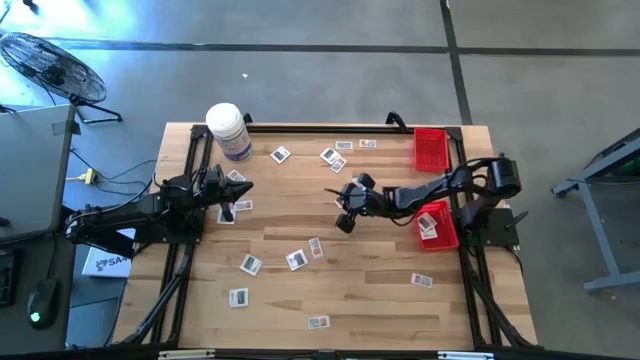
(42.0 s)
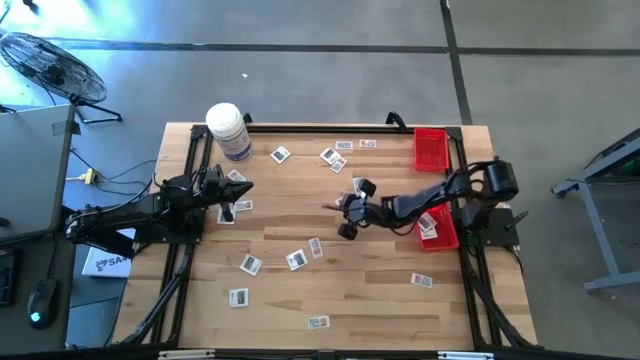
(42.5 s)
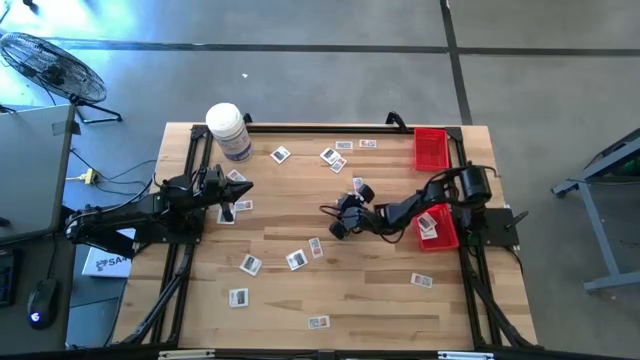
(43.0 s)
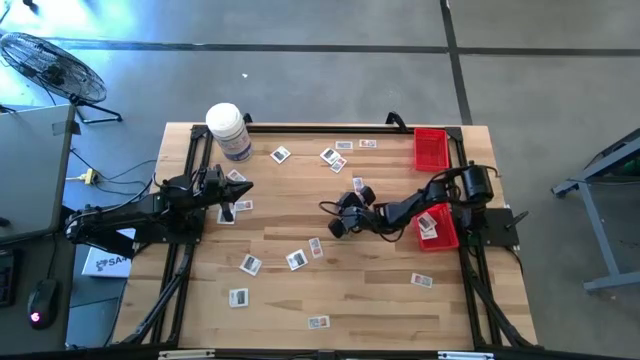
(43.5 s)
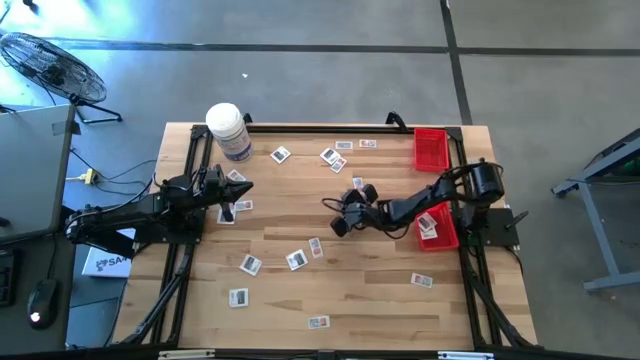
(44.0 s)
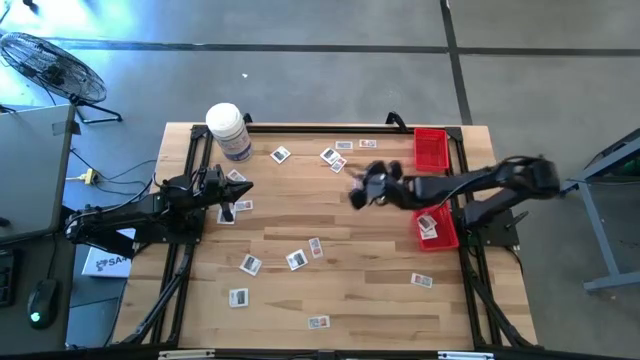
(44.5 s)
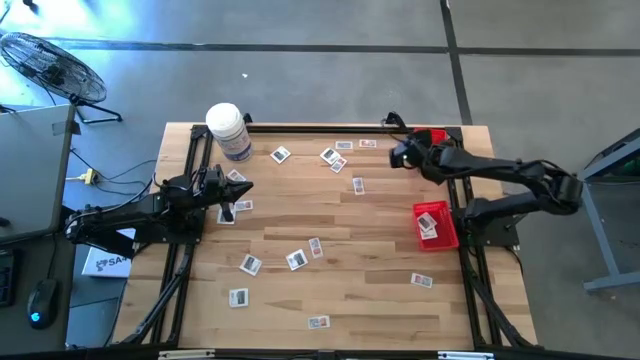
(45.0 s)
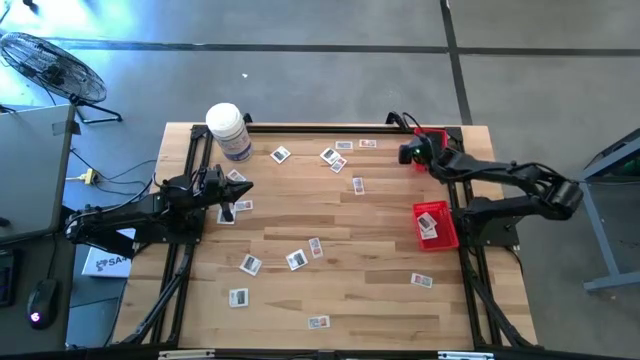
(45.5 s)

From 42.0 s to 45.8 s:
Task: Pick & Place First Aid Supplies
Put the ointment pack into the top basket

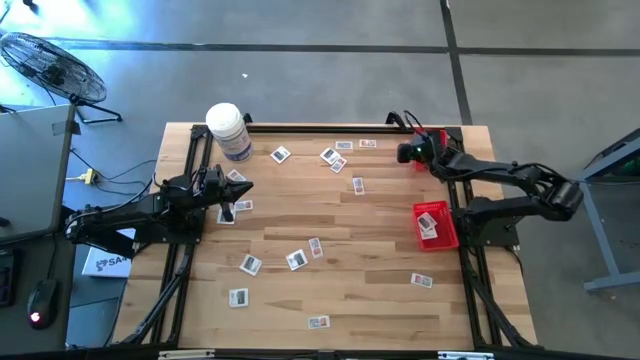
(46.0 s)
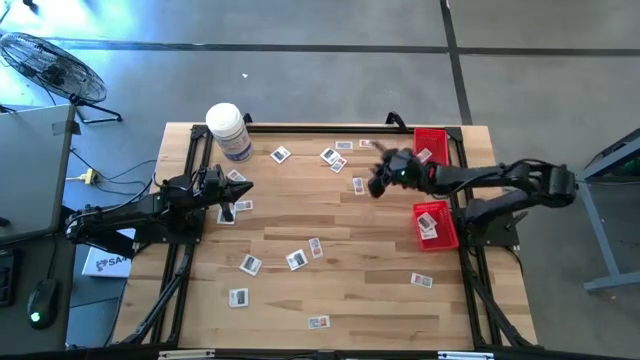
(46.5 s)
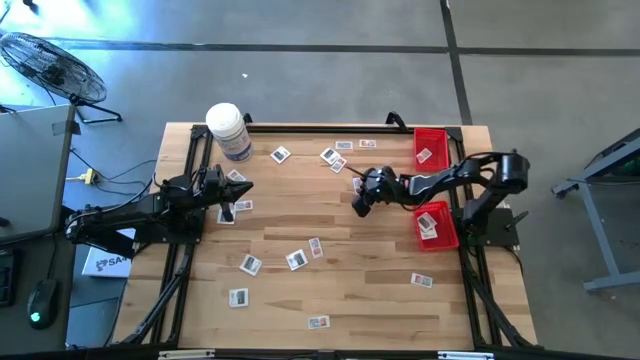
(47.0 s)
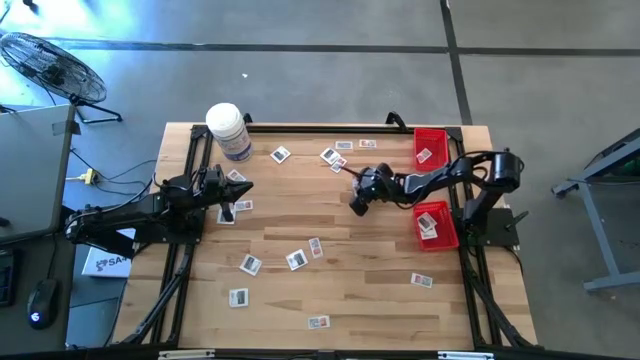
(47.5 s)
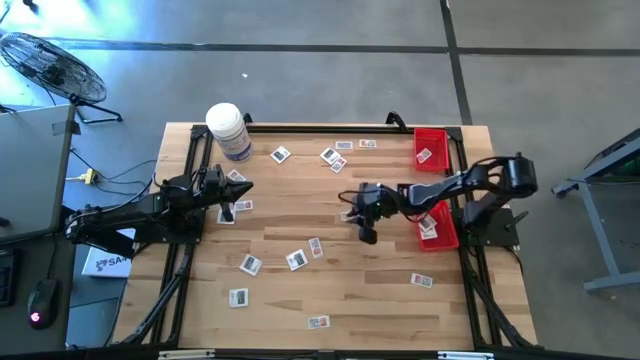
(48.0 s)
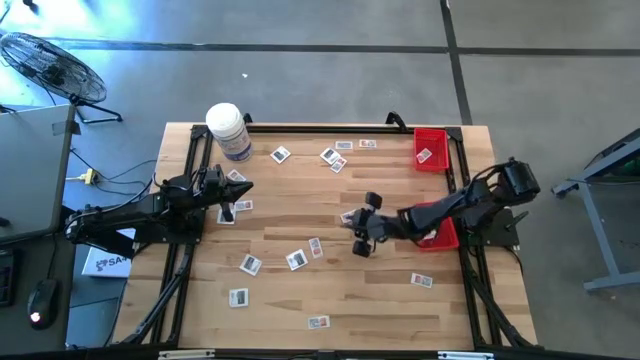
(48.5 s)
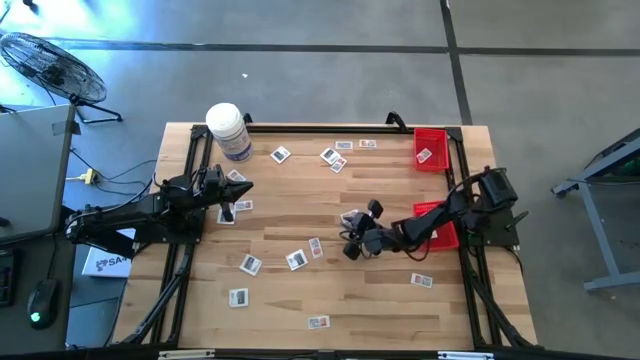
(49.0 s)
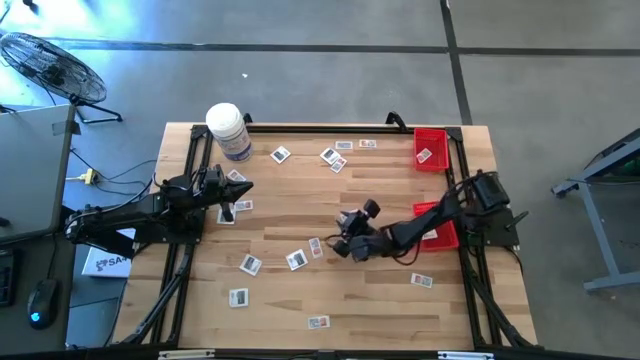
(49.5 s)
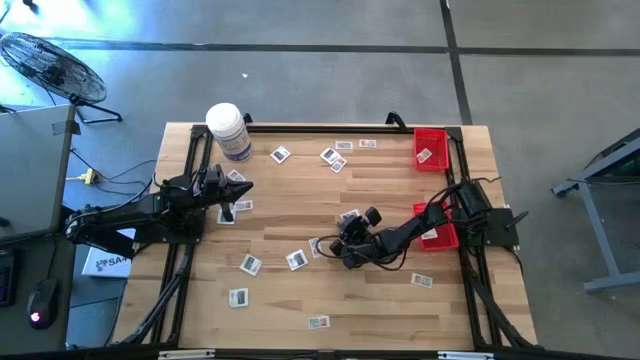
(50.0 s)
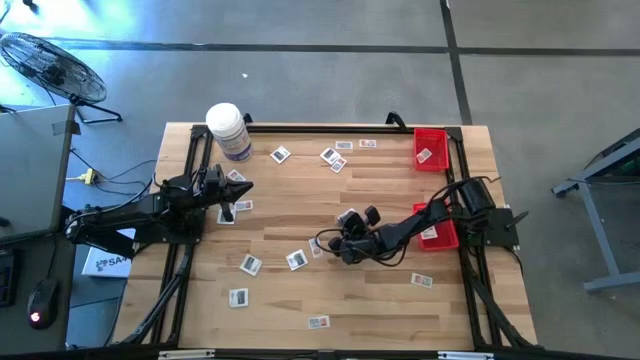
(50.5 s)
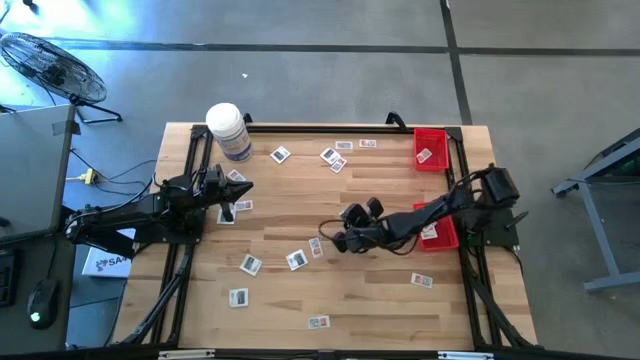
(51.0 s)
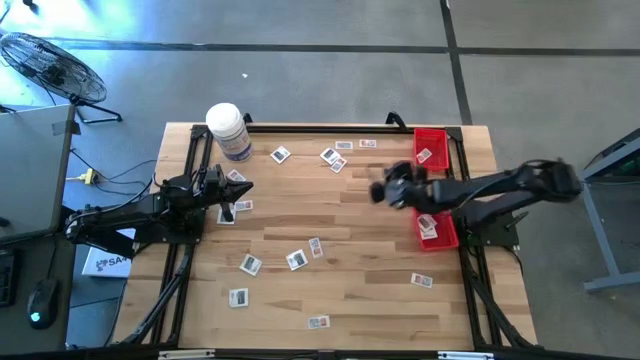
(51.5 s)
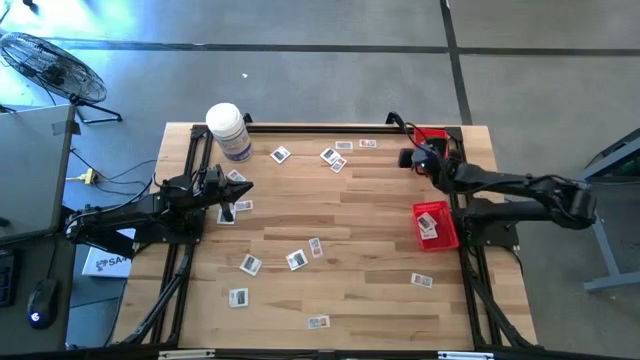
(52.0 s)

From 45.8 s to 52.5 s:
Put the ointment pack into the top basket

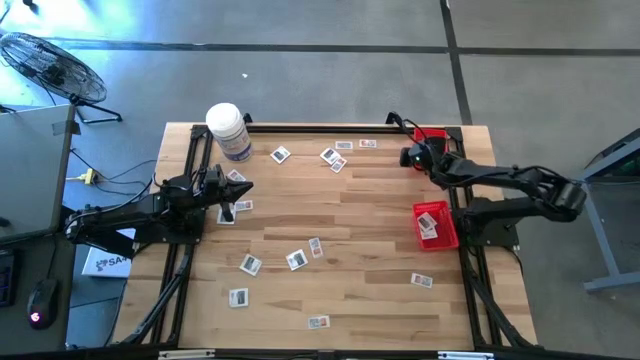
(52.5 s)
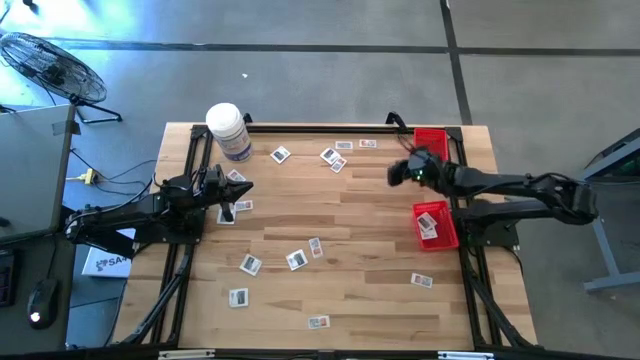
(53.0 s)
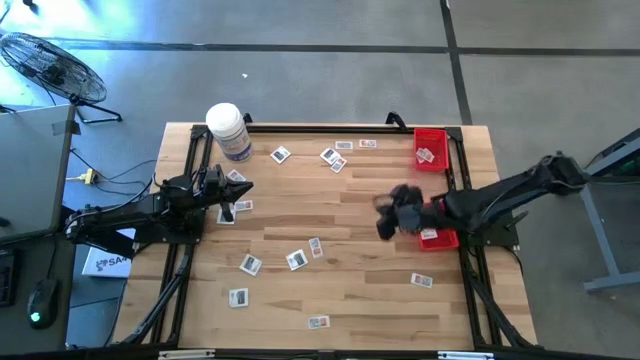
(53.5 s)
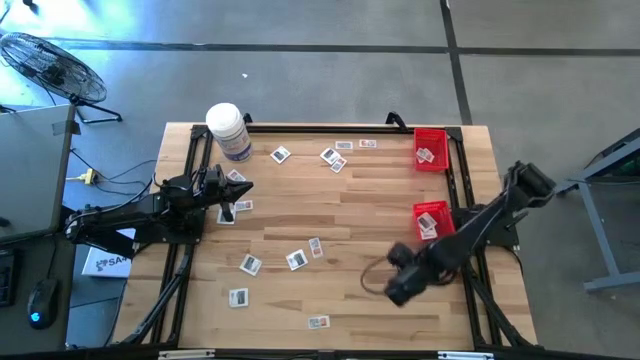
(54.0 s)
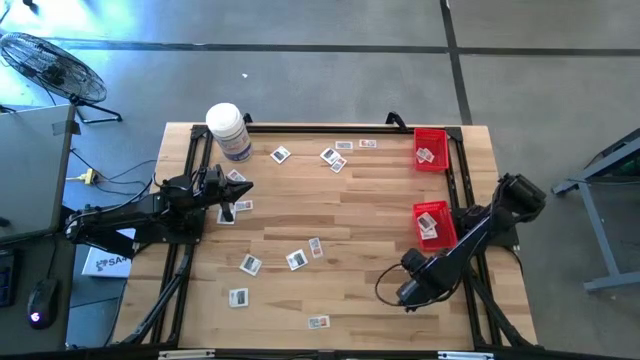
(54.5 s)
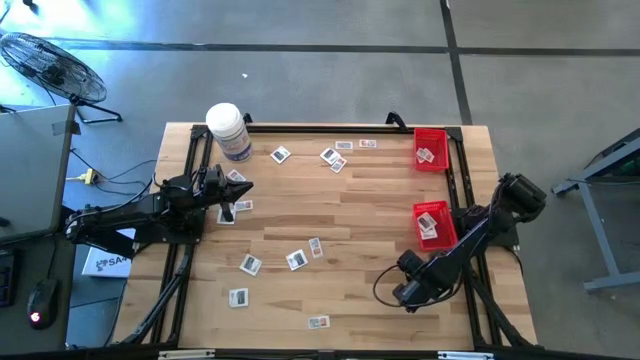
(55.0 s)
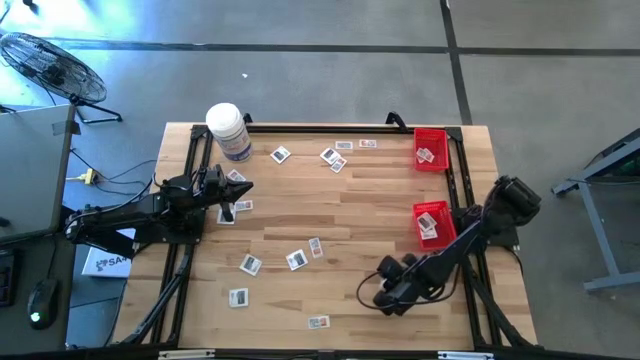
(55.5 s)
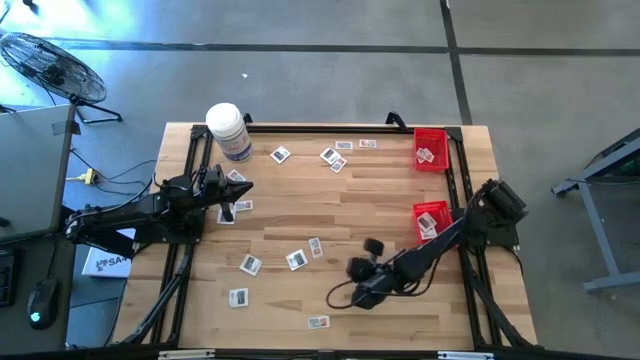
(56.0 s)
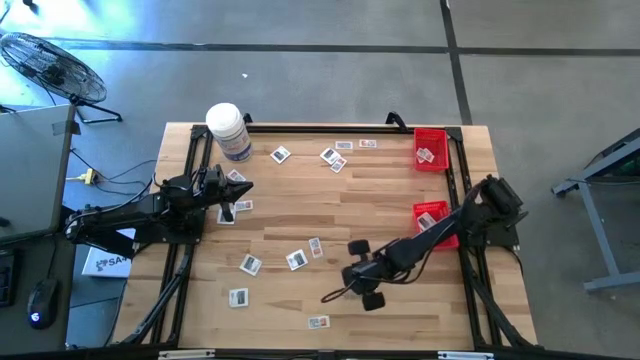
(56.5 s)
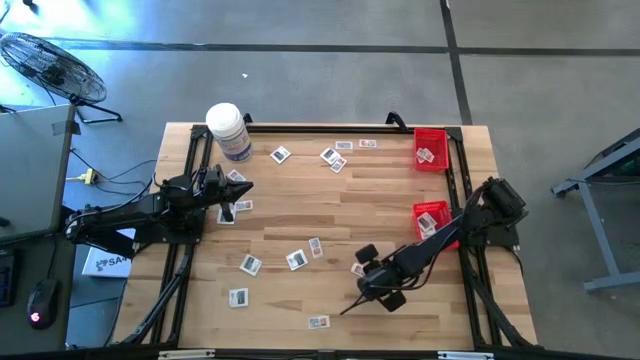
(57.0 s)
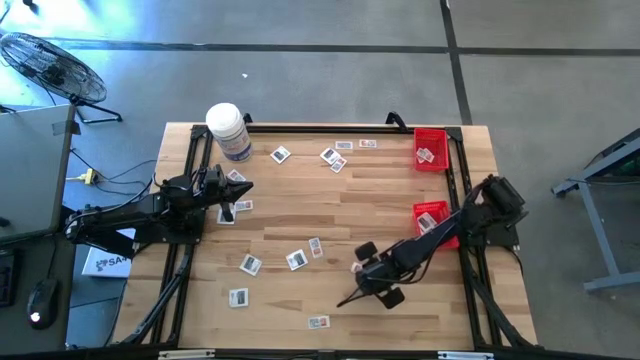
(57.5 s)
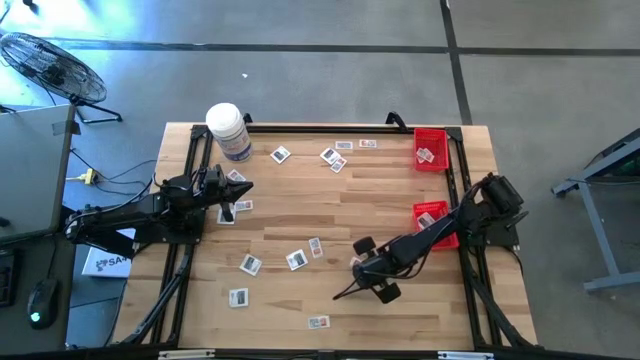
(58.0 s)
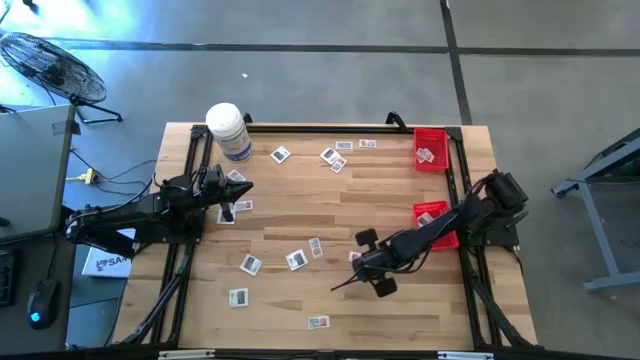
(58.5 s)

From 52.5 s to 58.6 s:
Put the ointment pack into the top basket

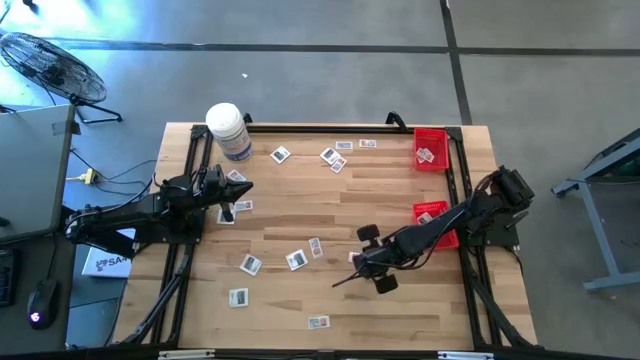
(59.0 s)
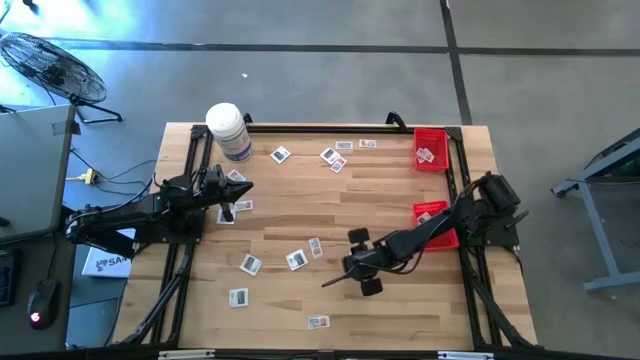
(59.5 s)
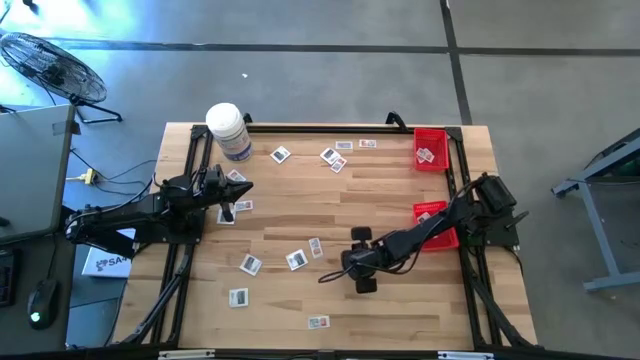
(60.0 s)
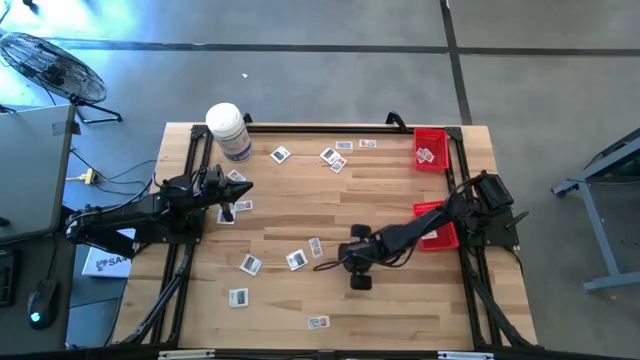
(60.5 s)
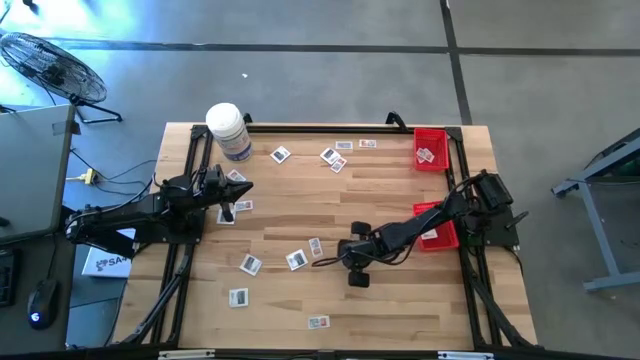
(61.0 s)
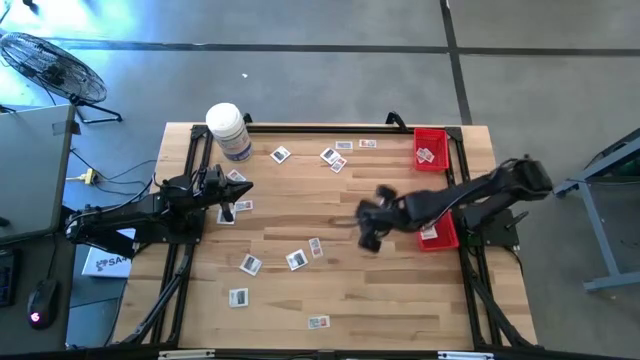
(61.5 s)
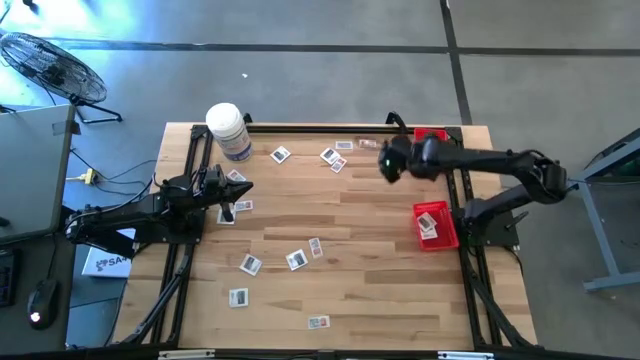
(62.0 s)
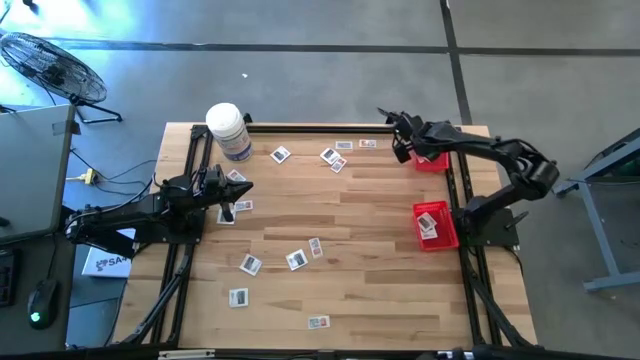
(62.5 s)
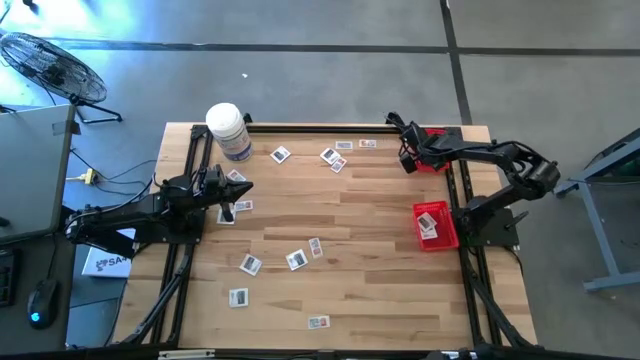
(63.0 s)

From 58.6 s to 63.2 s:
Put the ointment pack into the top basket
